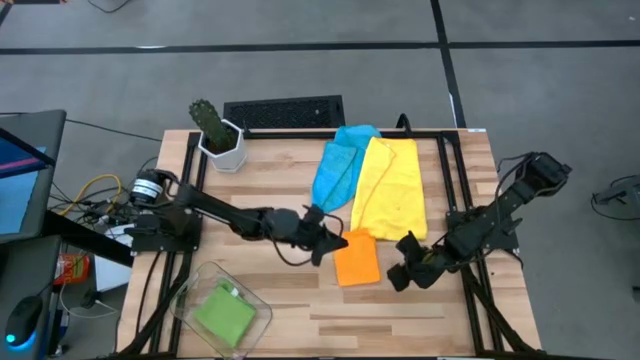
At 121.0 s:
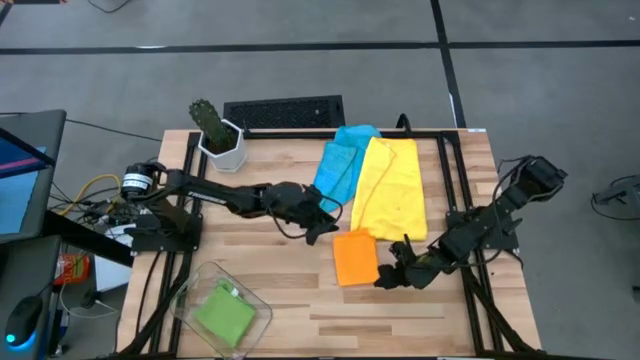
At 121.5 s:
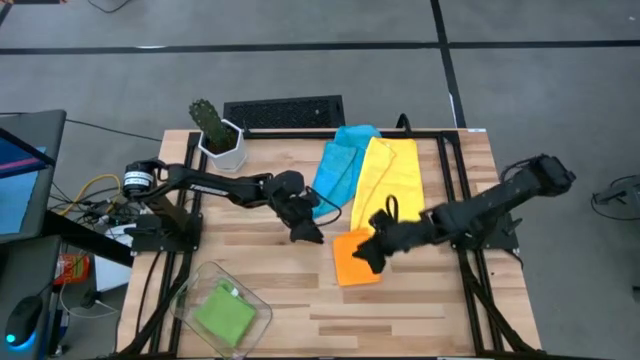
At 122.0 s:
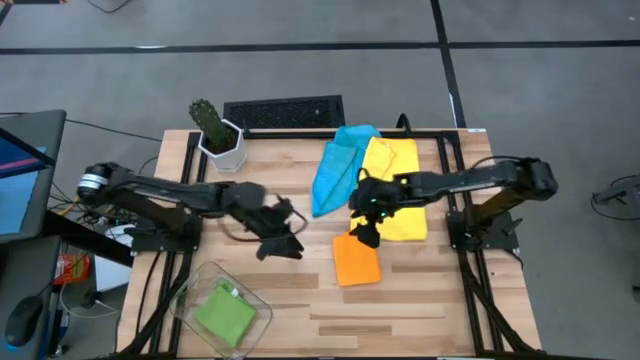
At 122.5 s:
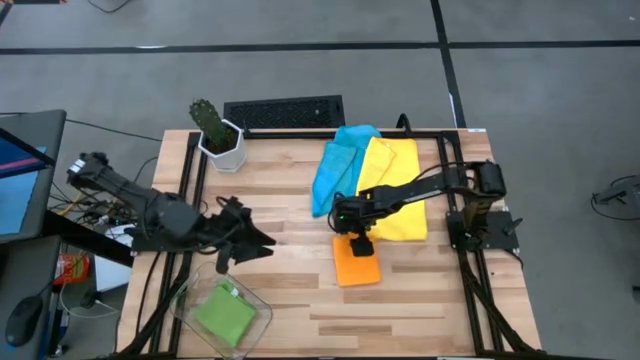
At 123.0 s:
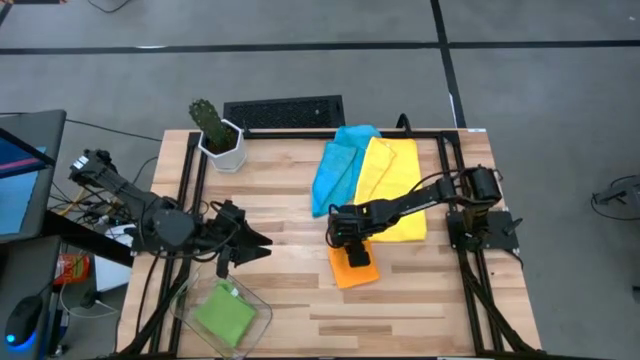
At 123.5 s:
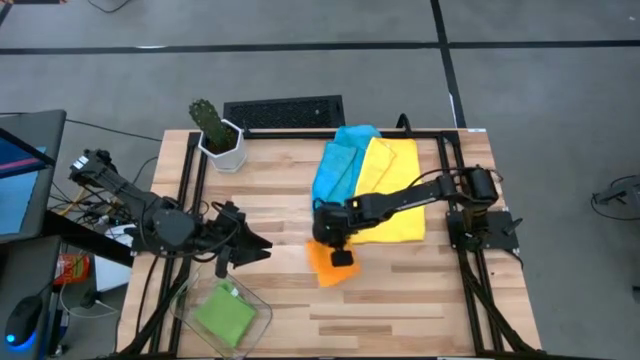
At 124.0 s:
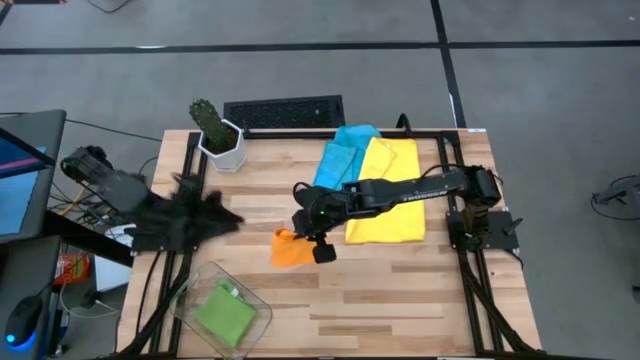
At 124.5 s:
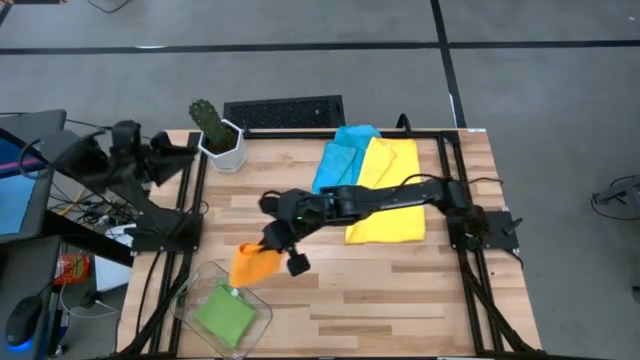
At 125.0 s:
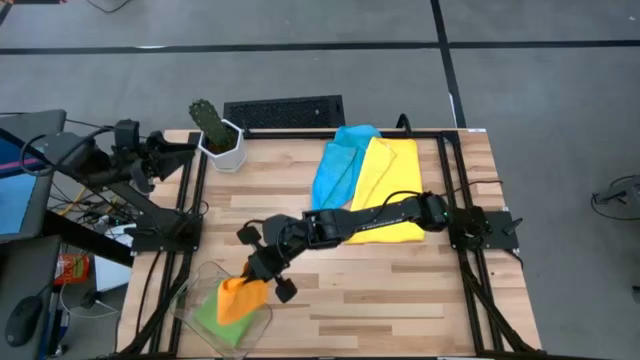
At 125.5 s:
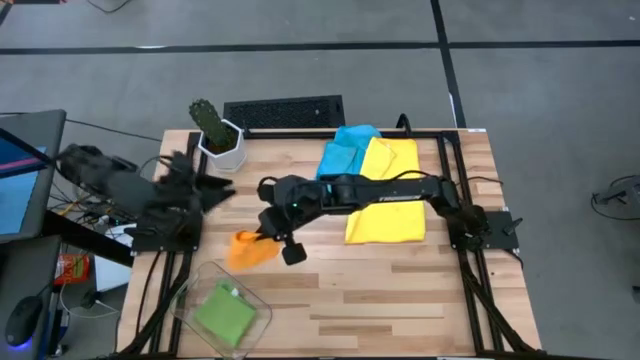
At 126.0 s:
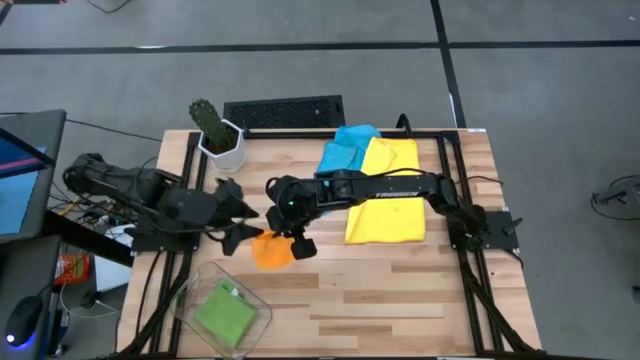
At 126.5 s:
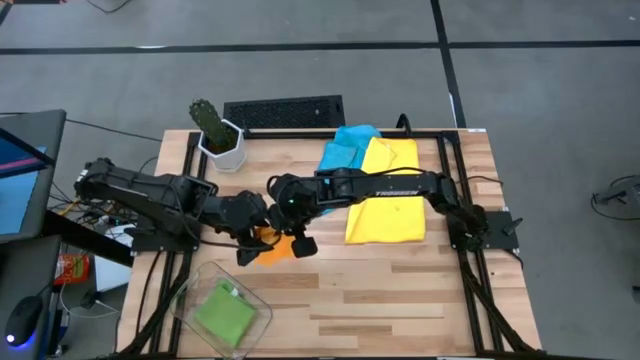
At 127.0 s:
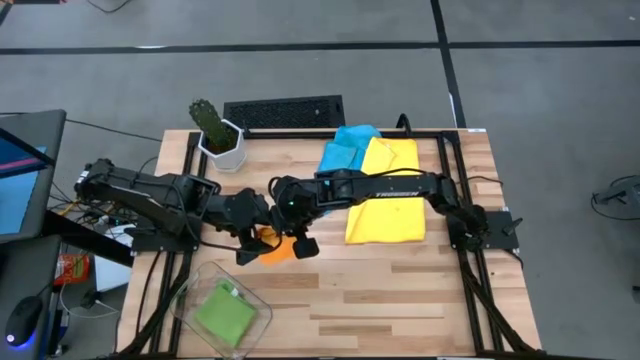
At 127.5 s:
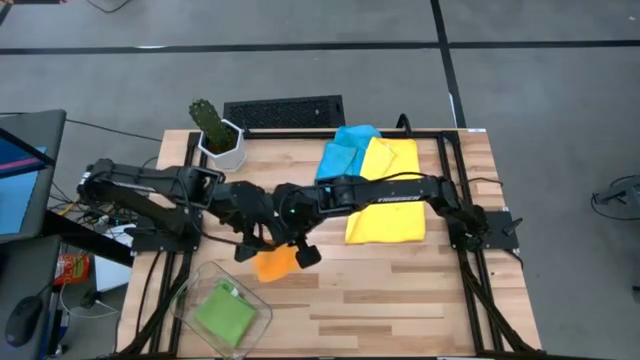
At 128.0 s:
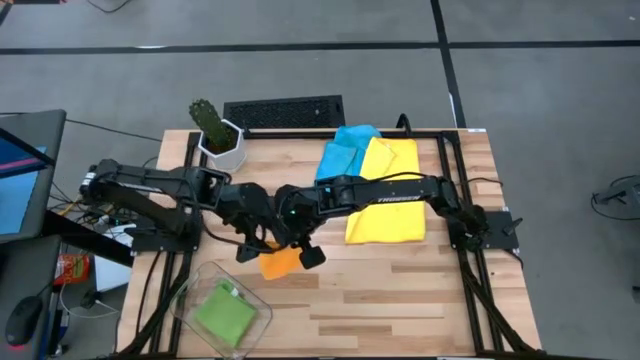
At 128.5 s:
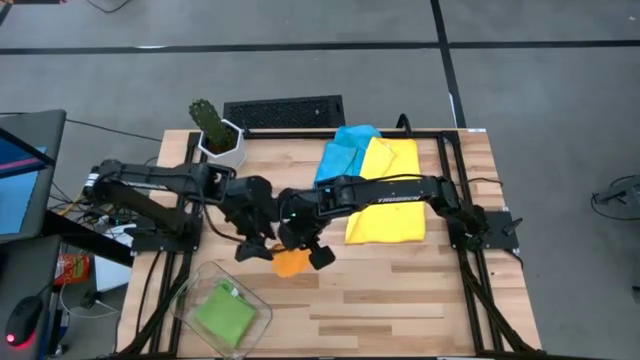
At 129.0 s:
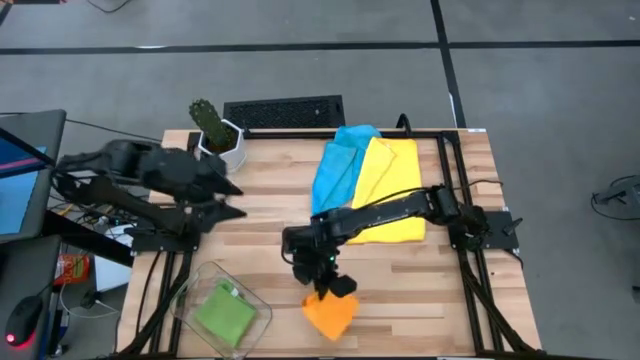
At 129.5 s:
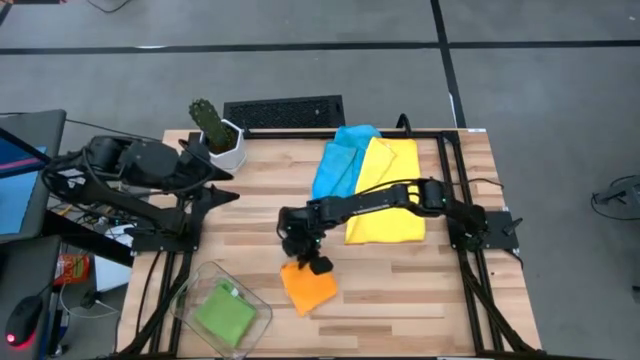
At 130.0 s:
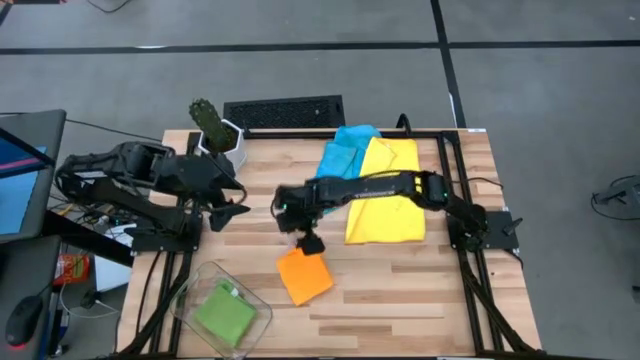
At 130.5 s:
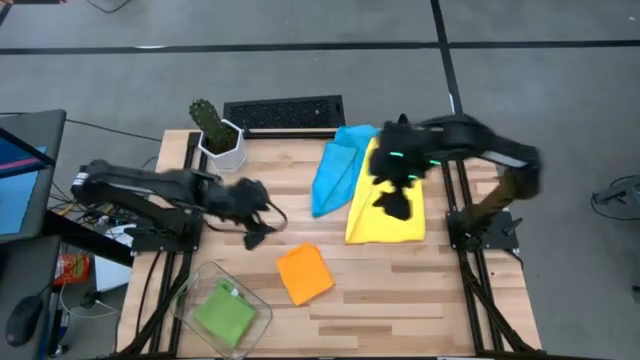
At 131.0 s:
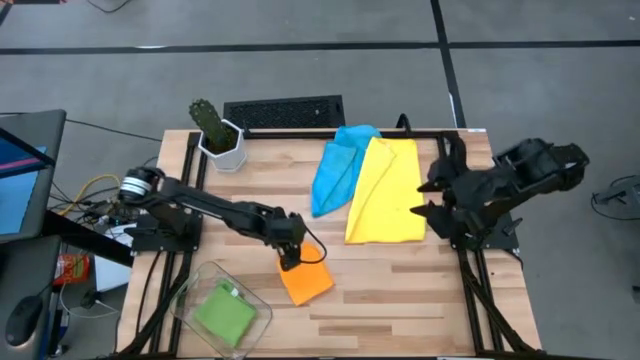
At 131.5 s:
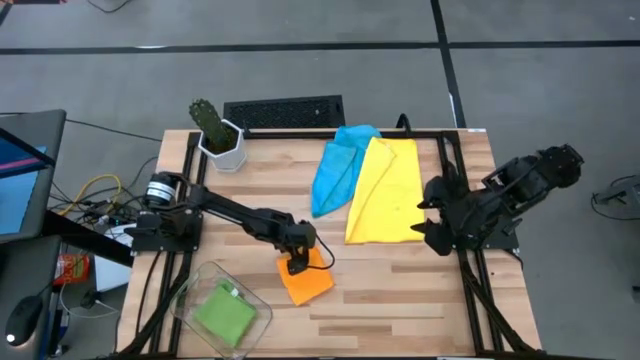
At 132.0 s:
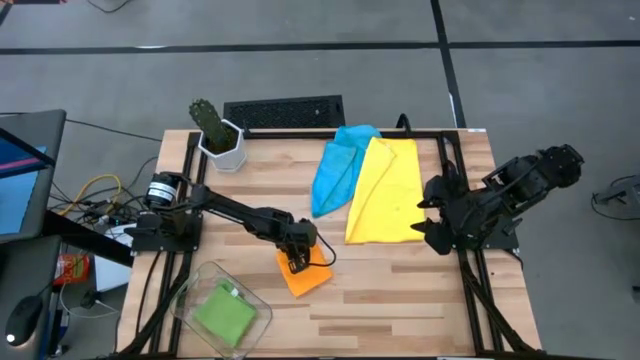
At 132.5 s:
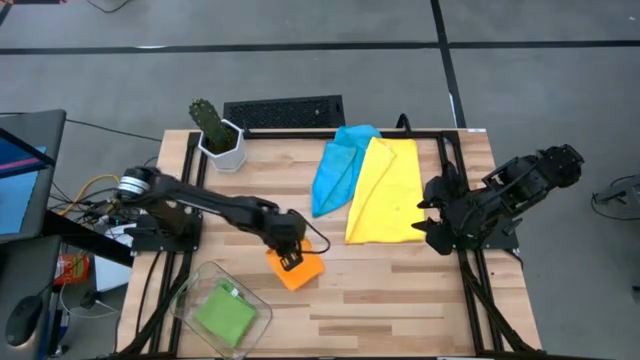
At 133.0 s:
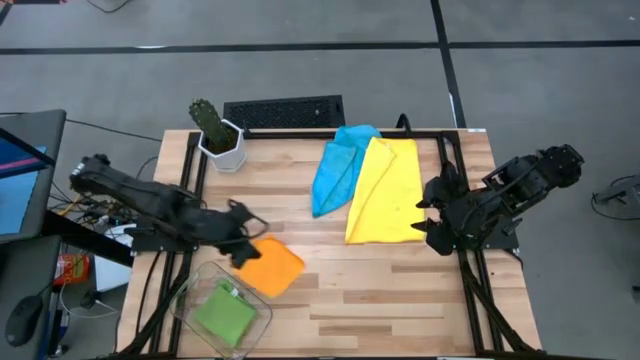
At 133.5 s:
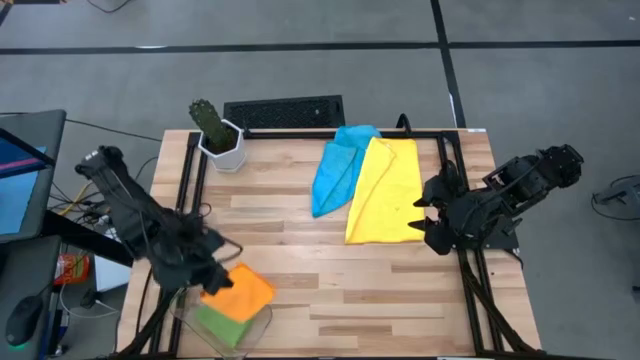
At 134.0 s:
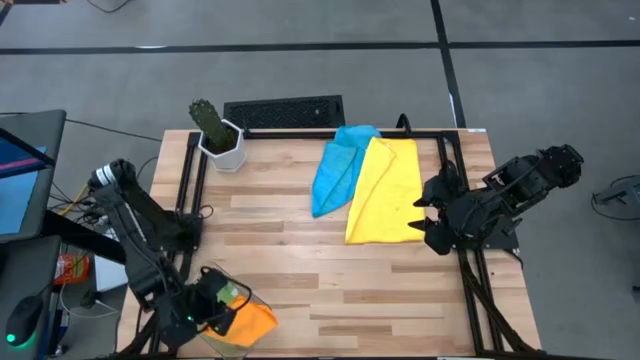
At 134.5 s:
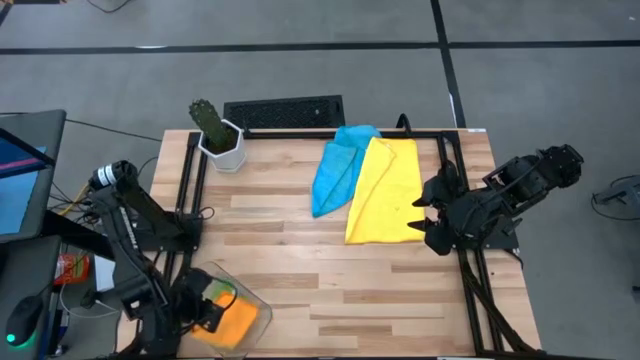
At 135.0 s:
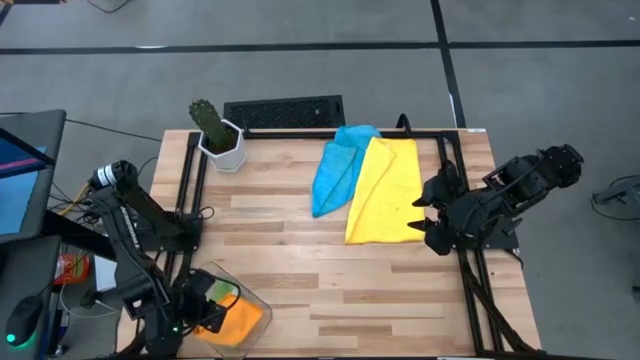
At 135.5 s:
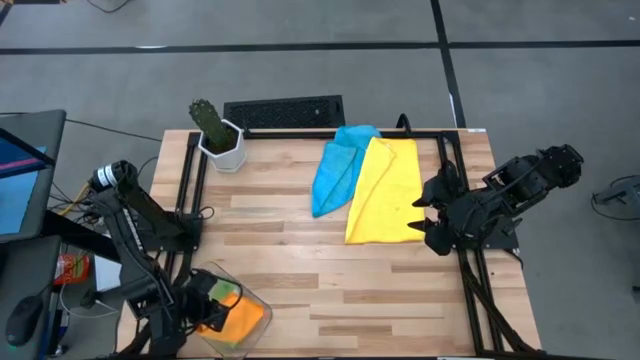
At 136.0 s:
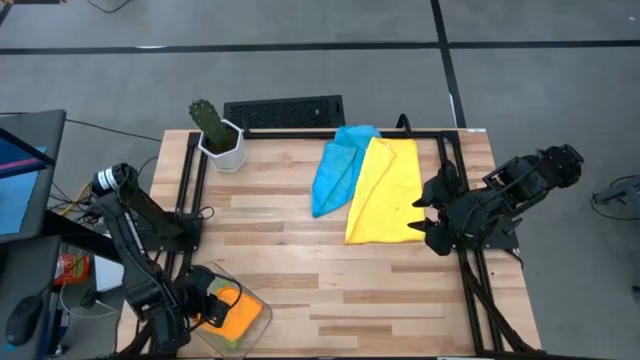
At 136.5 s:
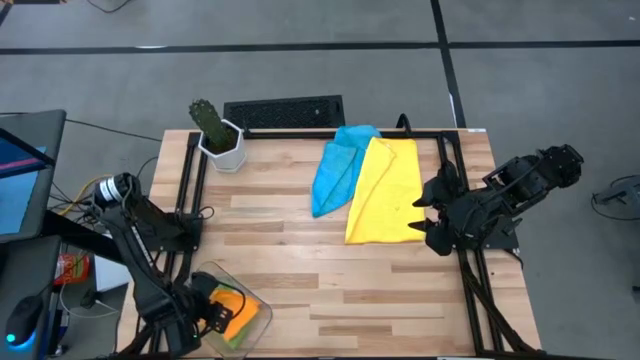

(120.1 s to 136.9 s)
Task: Fold microfiber towels
Put the orange microfiber towel into the transparent bin

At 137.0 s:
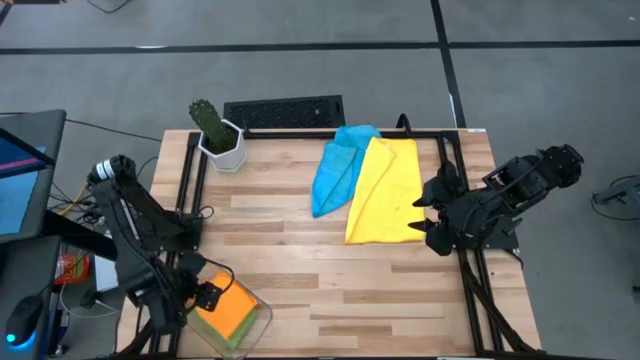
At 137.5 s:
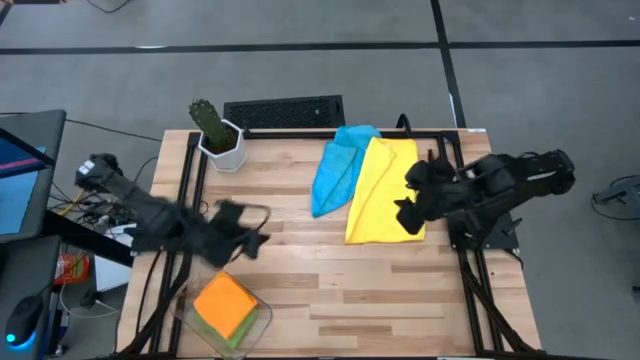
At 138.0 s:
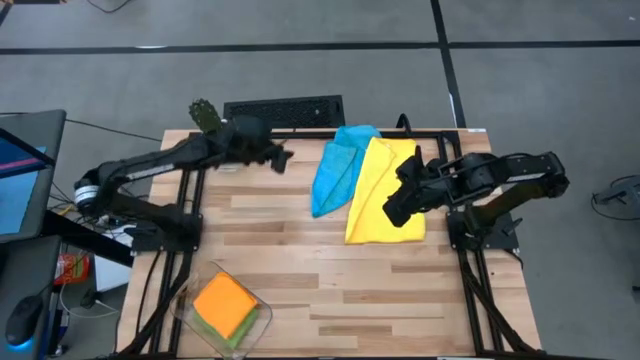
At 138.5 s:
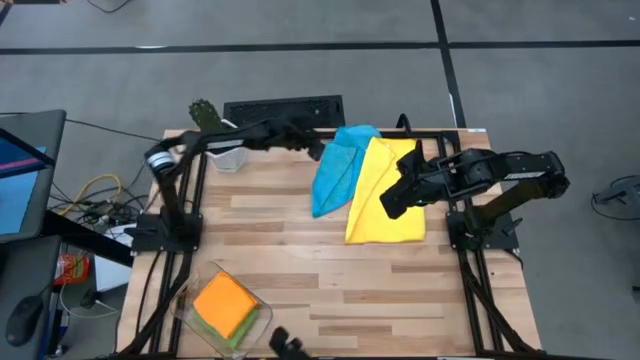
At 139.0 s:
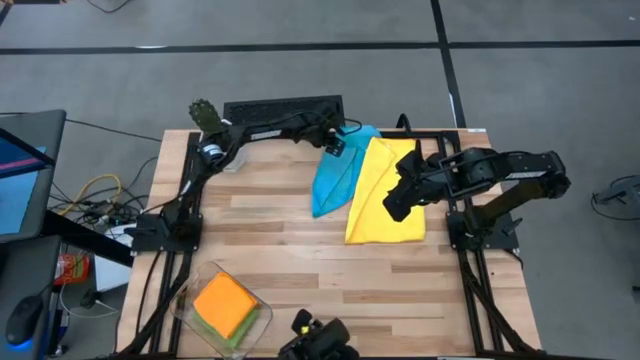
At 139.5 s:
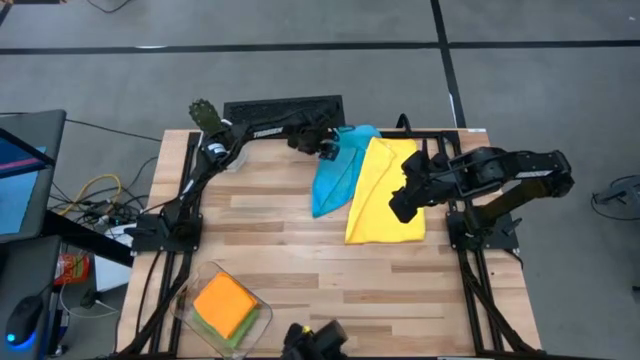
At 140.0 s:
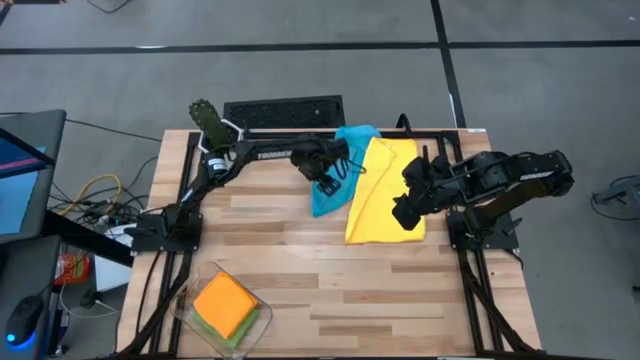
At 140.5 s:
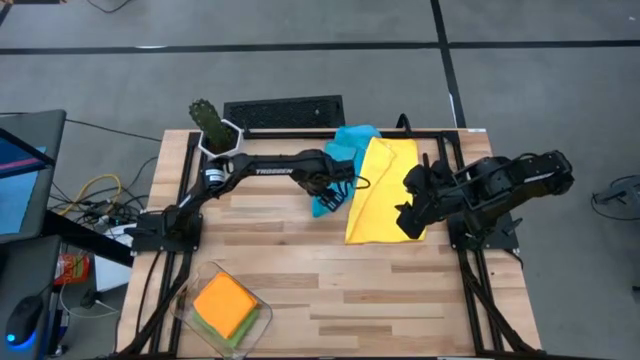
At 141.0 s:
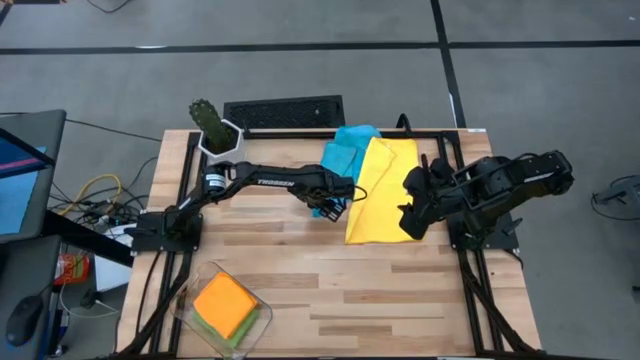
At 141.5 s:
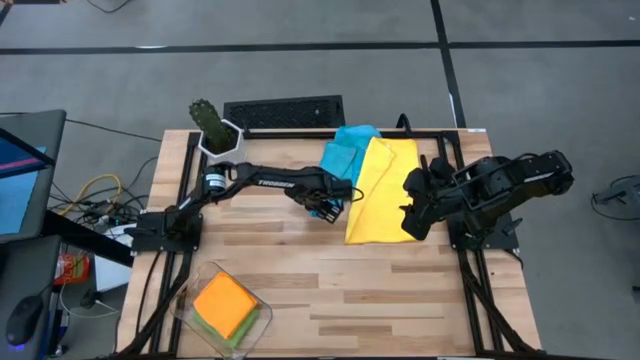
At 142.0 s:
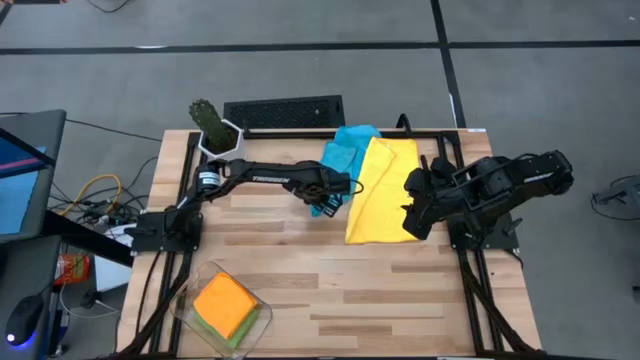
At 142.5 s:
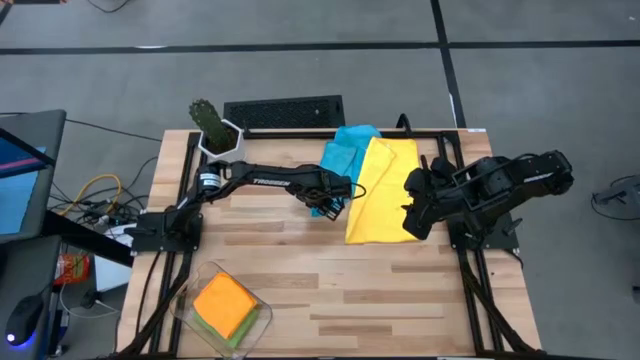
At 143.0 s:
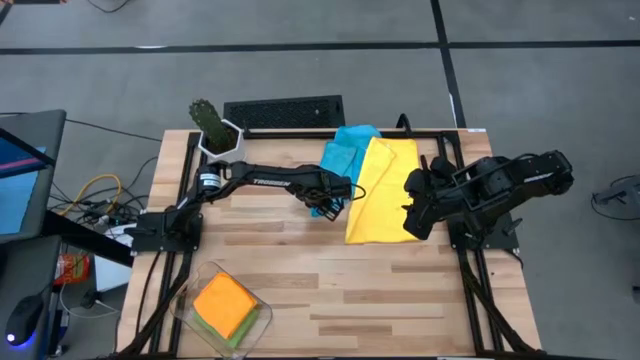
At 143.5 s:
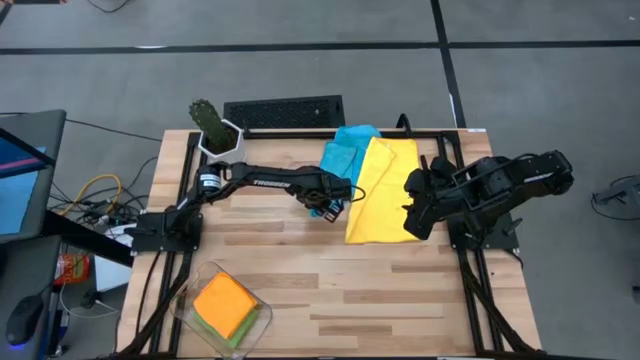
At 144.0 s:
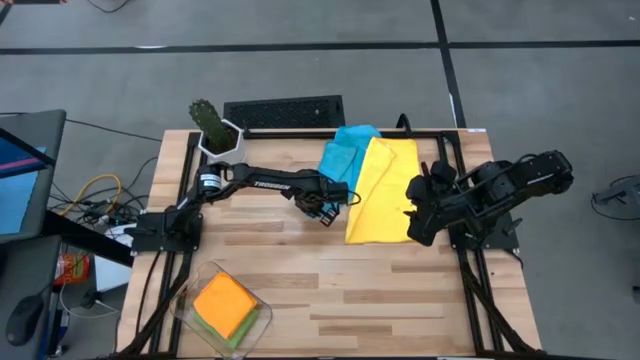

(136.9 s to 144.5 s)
Fold the blue microfiber towel
